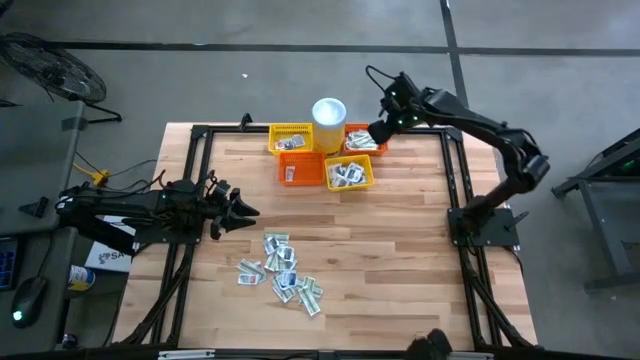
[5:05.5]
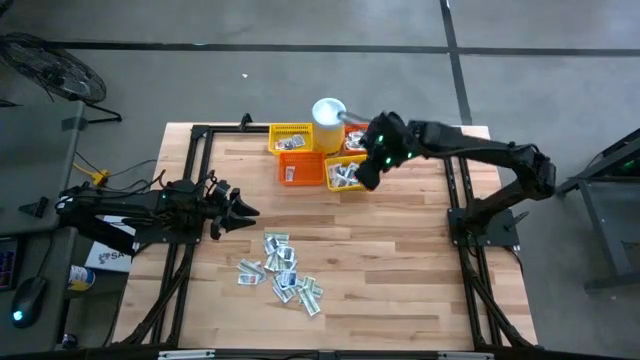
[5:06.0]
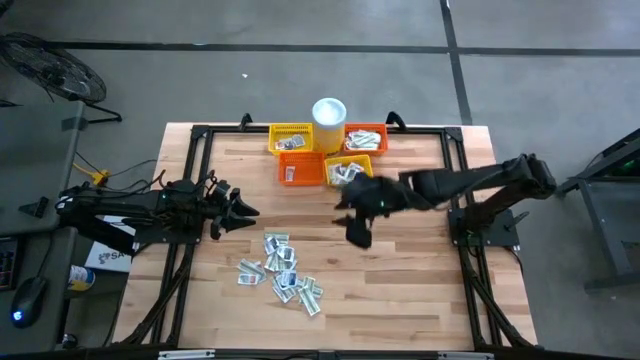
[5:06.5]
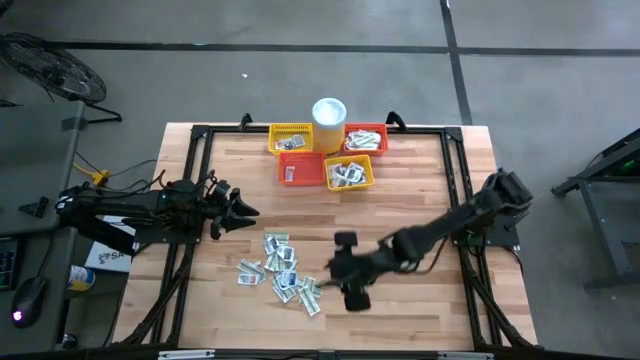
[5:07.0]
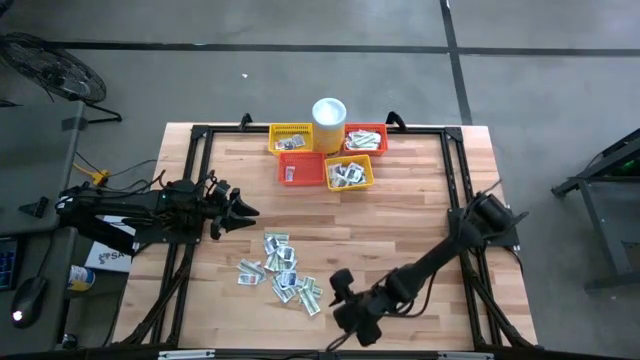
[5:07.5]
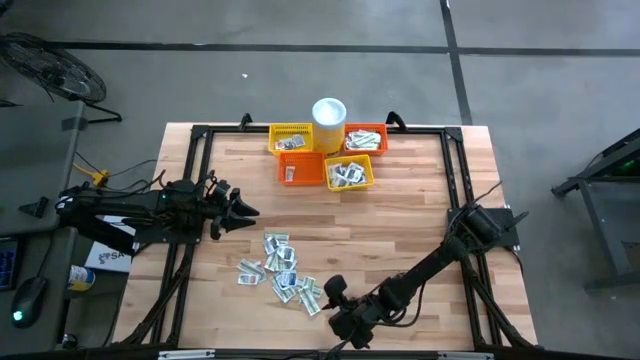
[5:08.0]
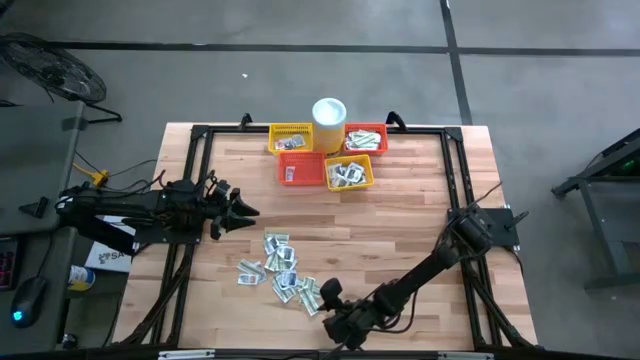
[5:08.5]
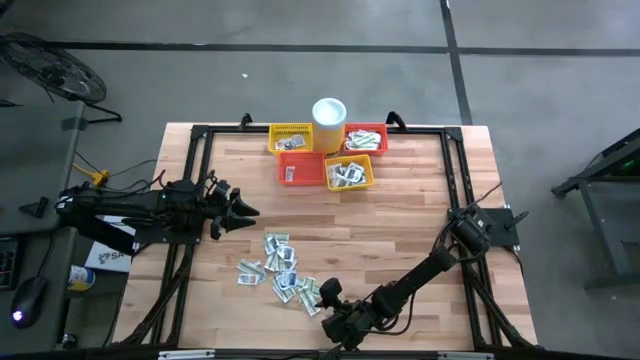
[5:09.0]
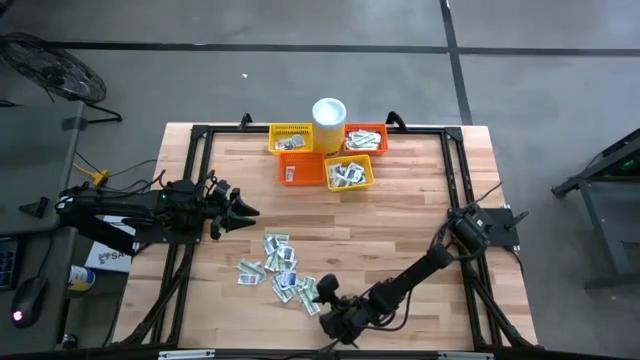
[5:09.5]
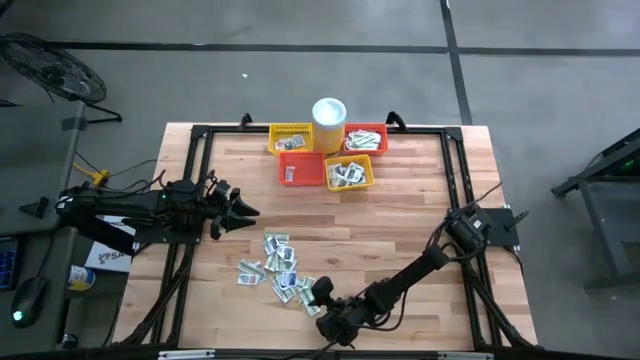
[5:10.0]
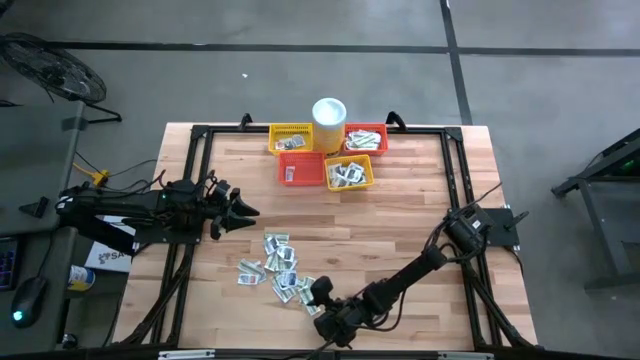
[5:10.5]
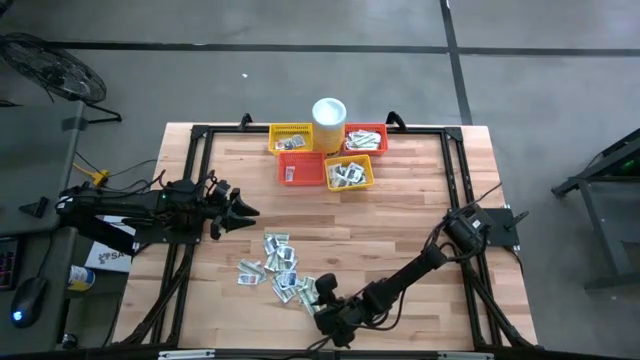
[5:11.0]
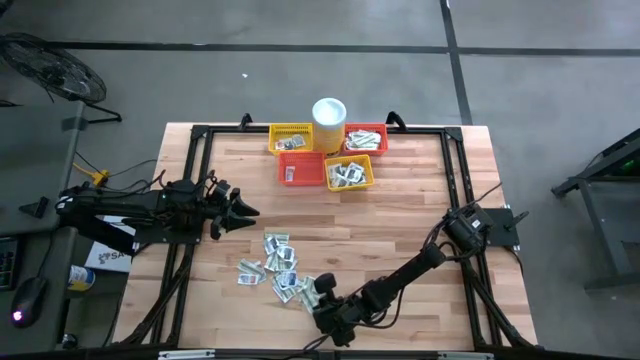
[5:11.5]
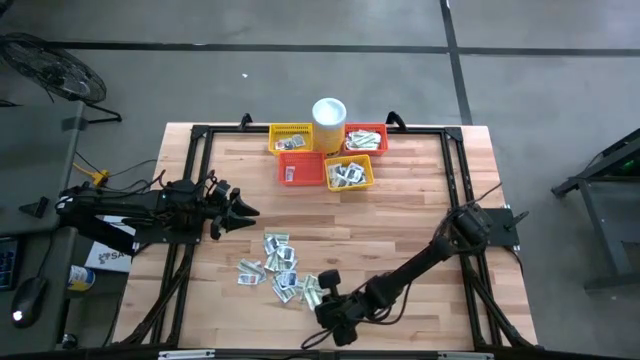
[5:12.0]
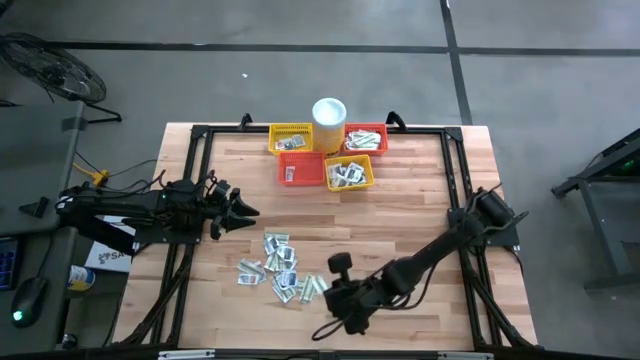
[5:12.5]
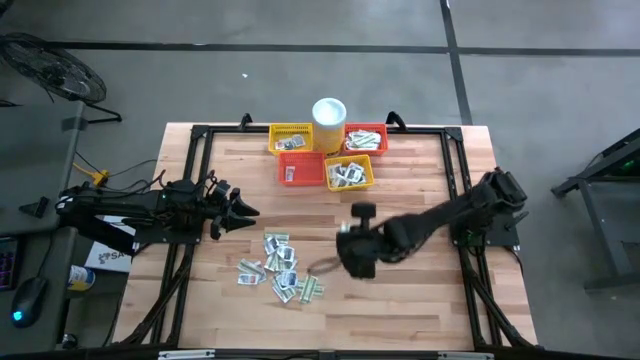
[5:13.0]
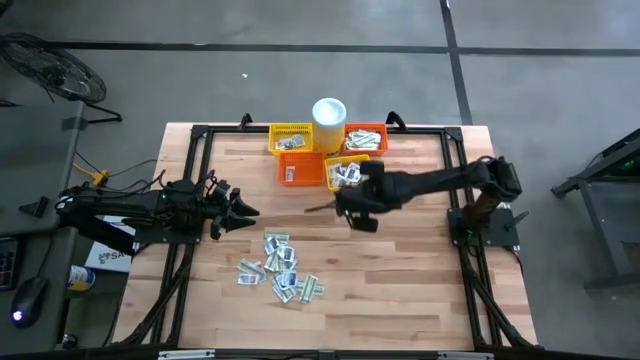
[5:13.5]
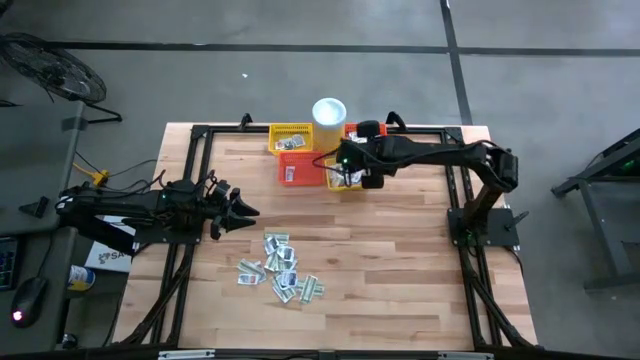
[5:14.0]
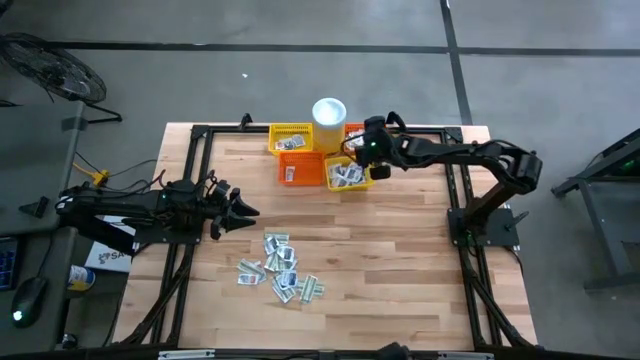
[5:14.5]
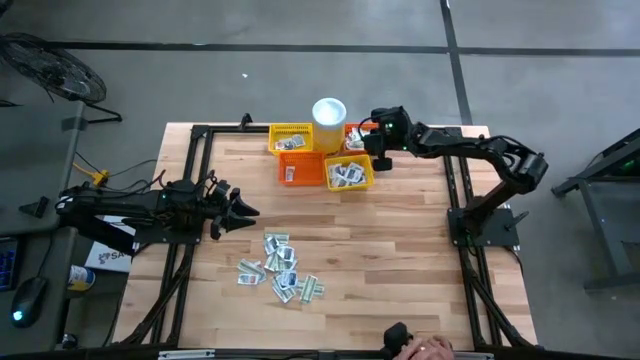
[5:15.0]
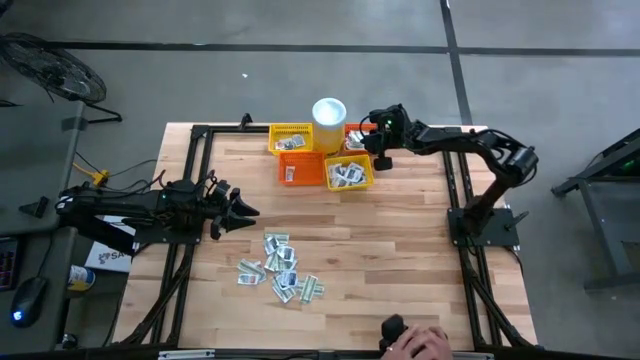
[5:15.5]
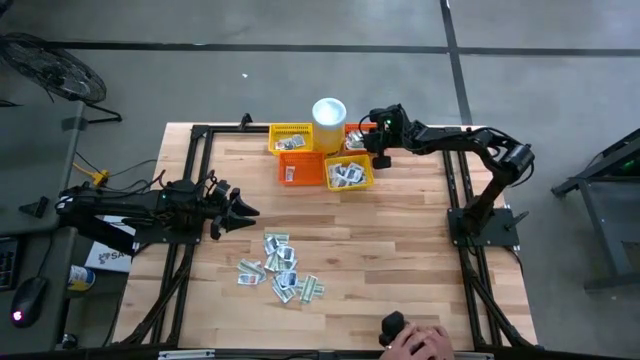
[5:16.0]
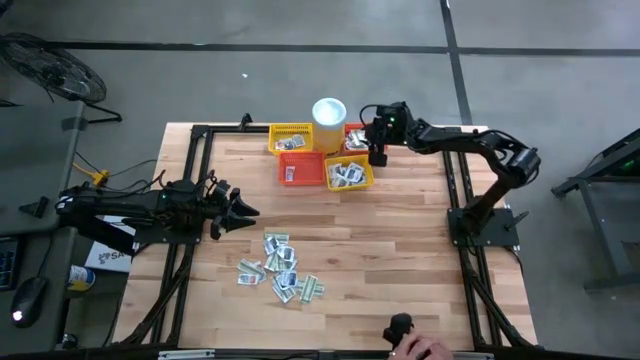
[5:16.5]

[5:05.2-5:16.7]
Task: Pick & Place First Aid Supplies
Put the green bandage pack into the top orange basket

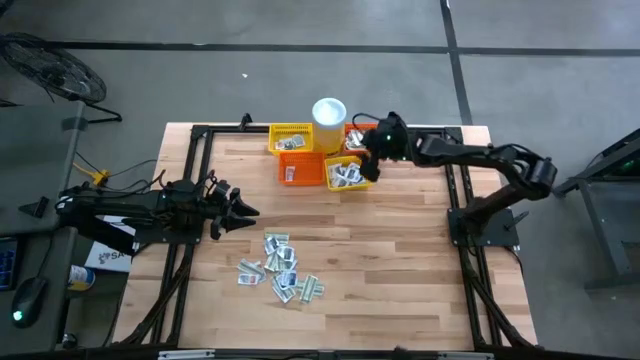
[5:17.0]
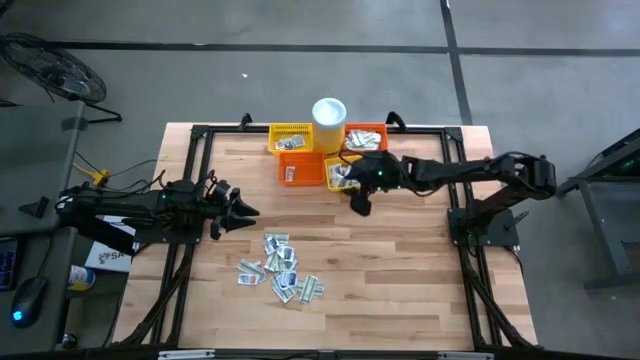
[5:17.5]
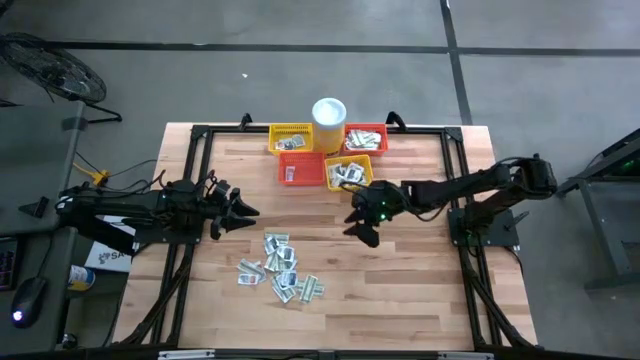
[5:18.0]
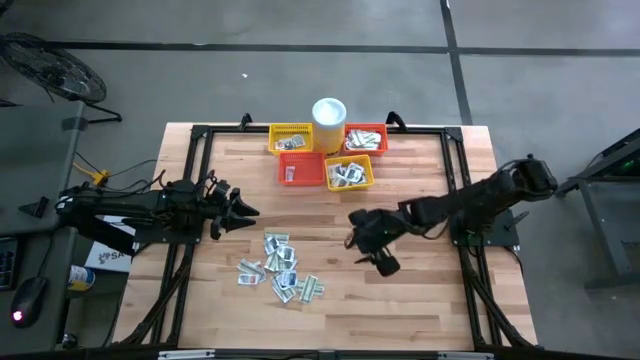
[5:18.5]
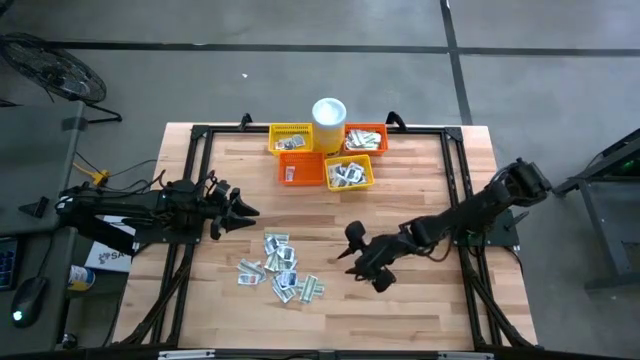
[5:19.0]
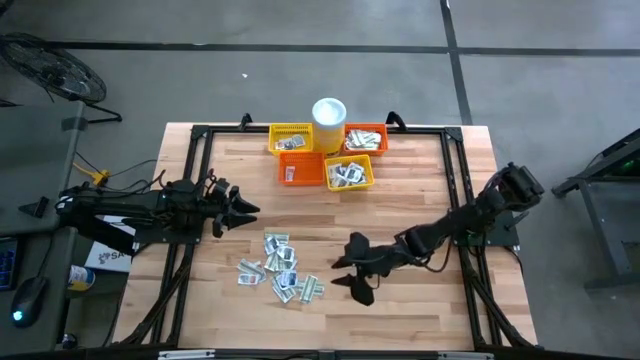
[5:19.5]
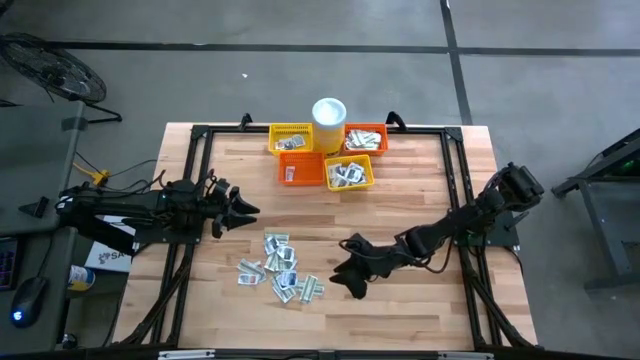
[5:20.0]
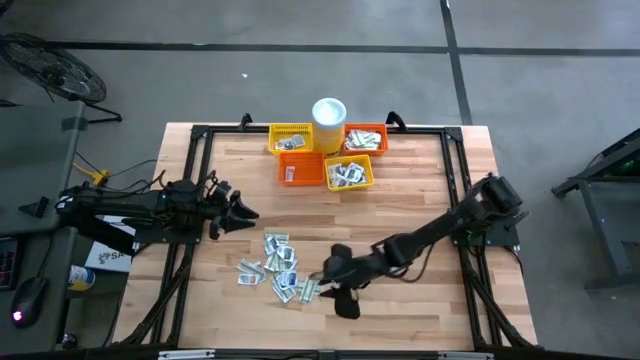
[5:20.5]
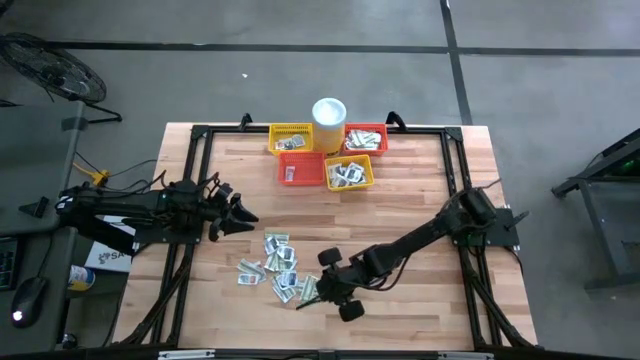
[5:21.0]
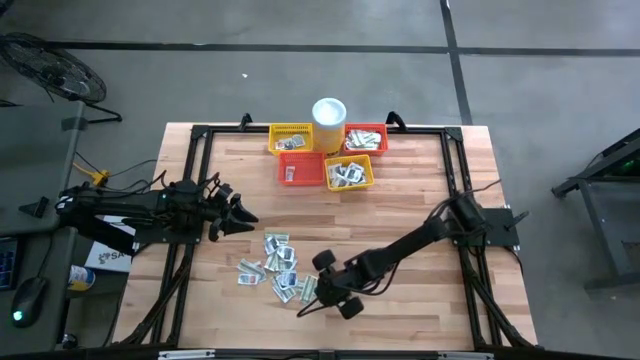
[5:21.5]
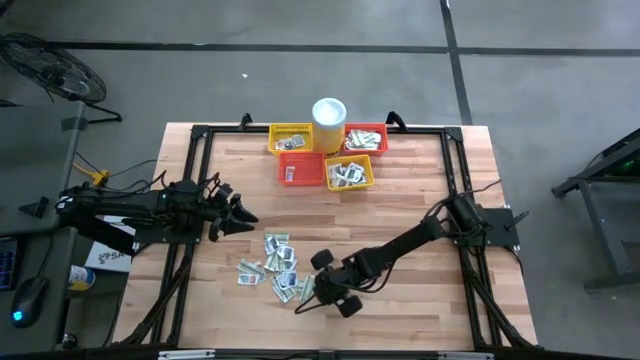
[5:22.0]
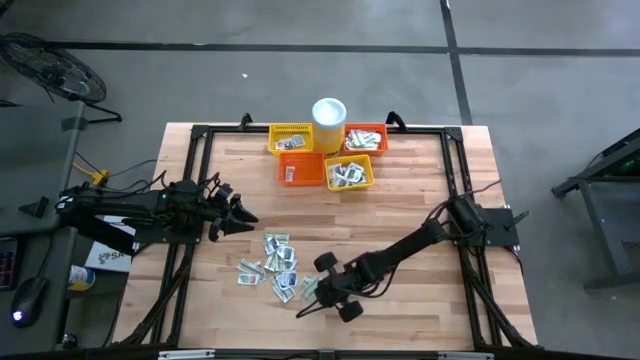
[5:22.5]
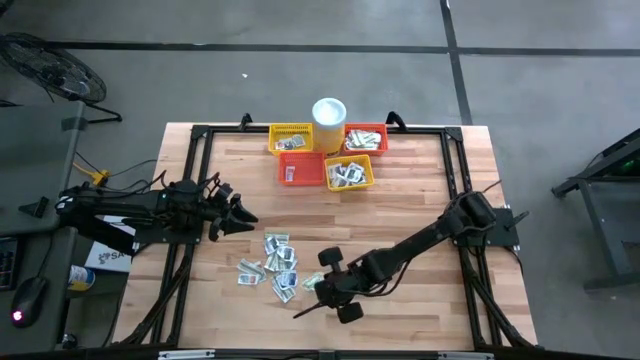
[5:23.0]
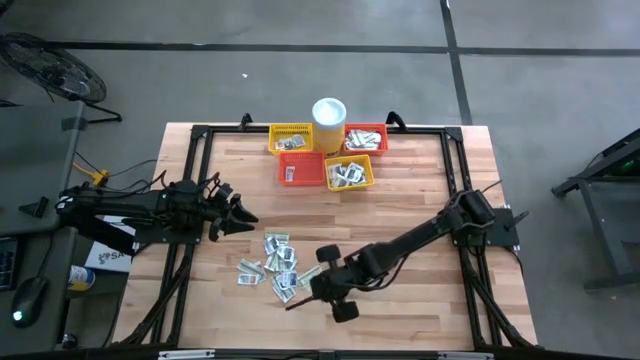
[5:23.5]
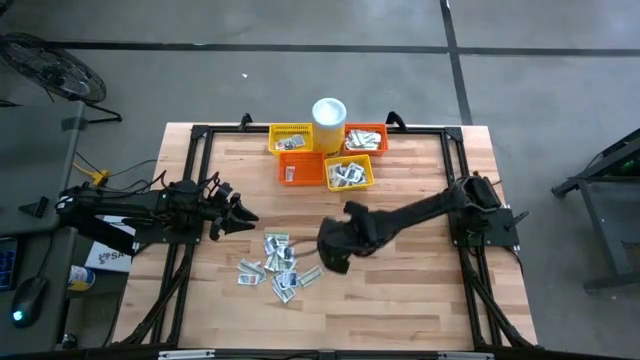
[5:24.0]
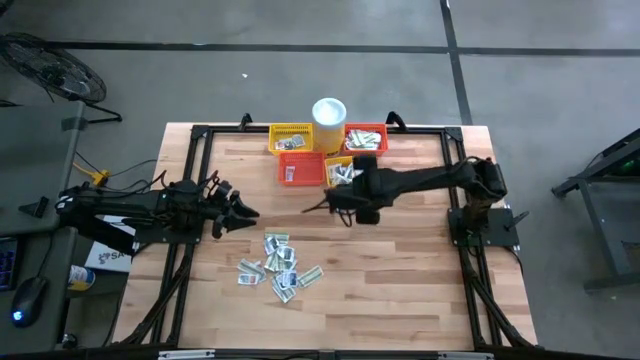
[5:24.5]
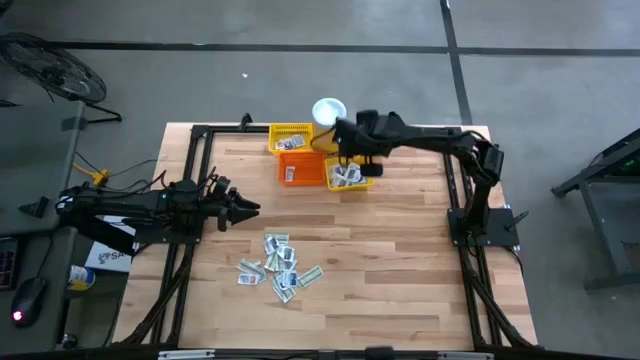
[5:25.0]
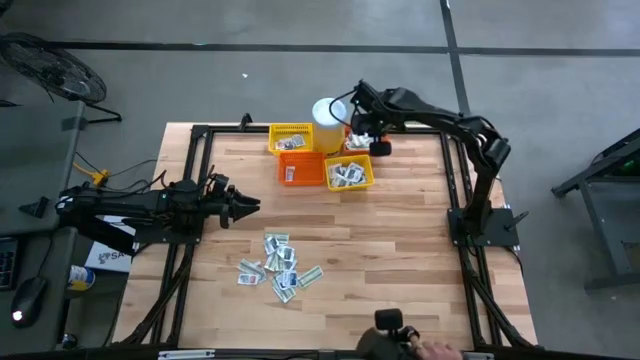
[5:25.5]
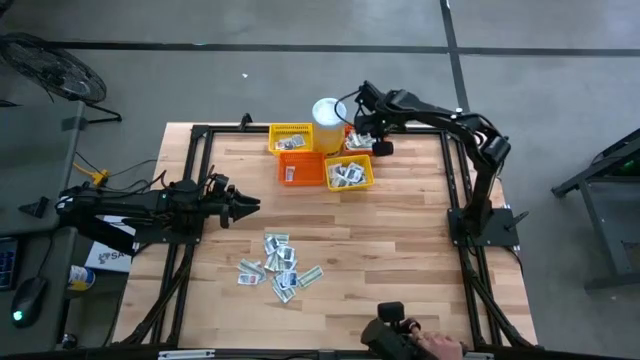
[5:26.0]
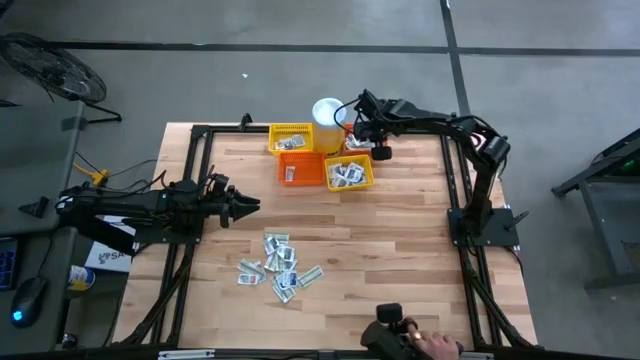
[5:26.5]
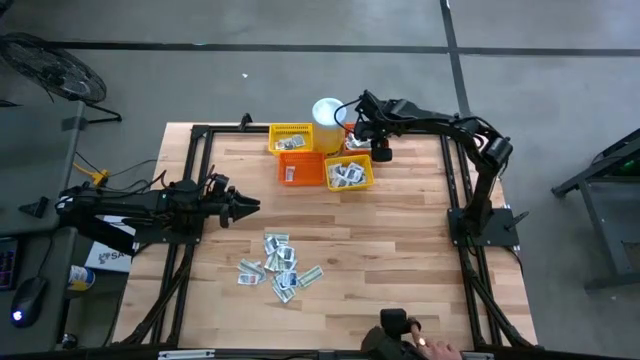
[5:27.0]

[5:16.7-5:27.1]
Put the green bandage pack into the top orange basket
